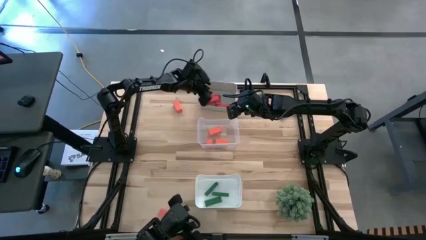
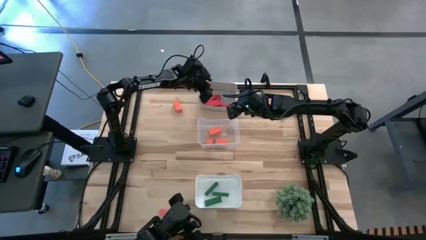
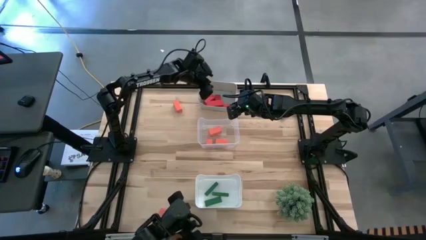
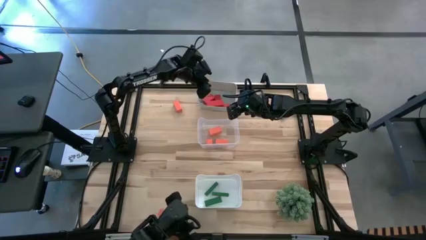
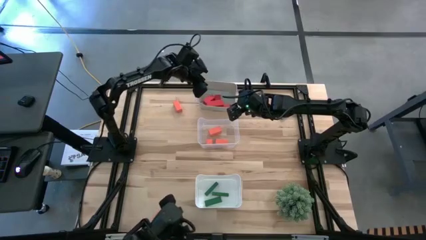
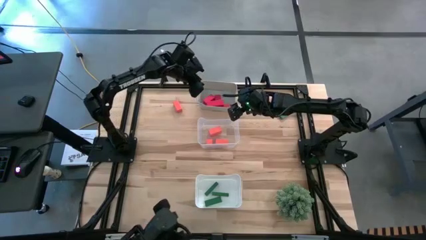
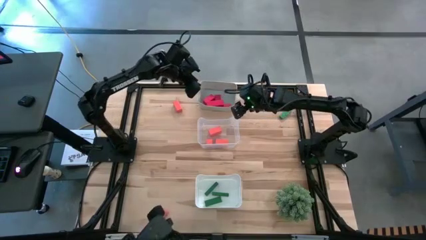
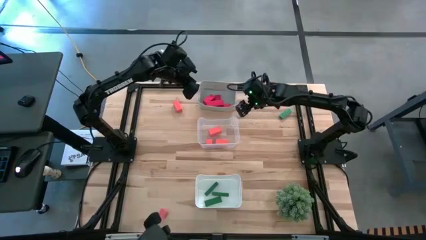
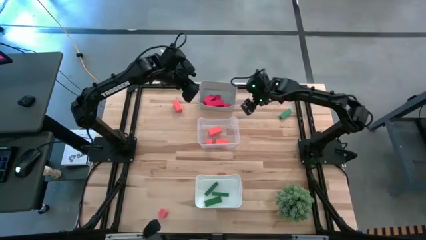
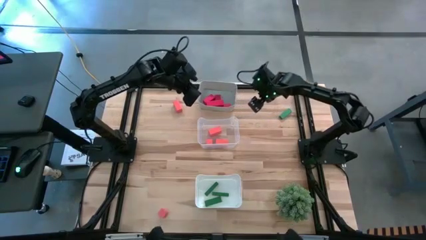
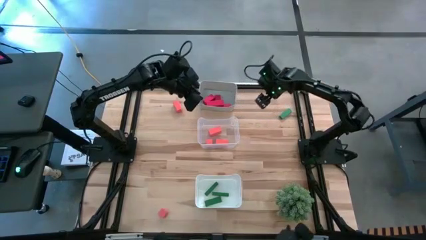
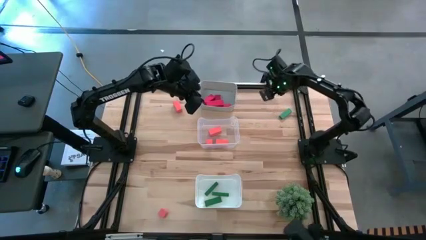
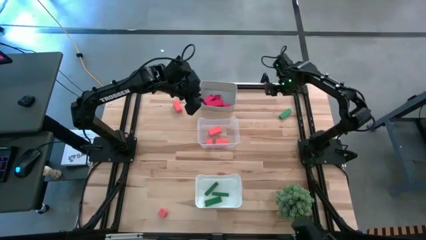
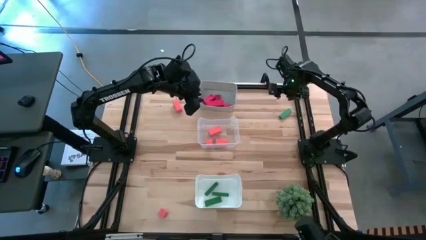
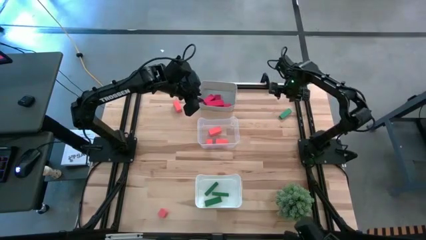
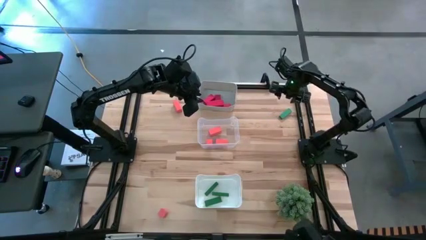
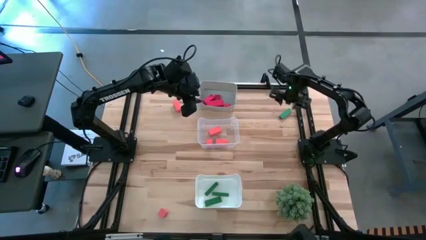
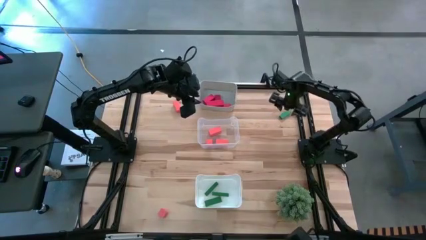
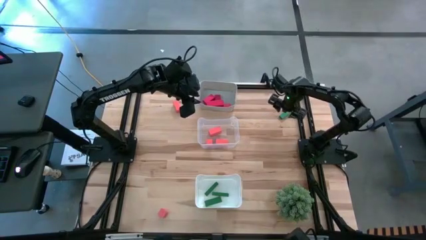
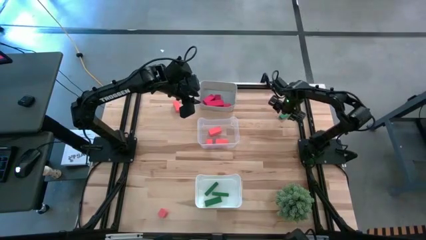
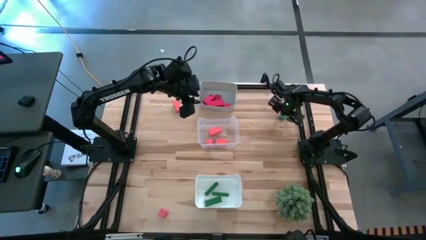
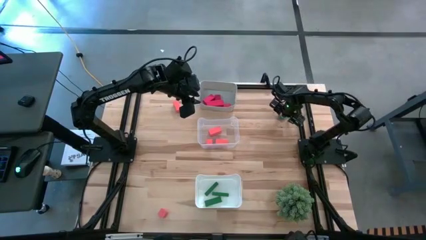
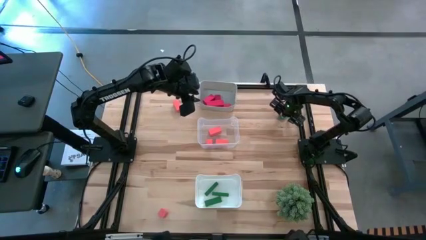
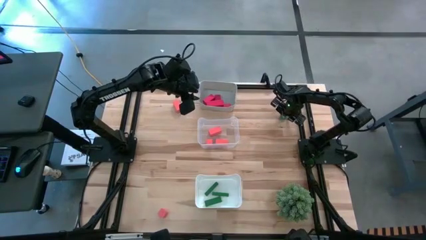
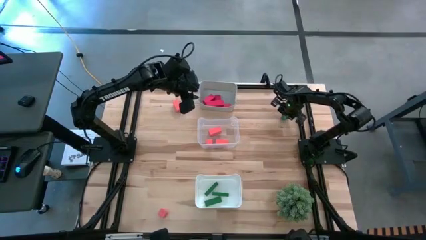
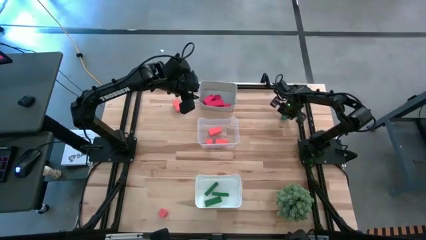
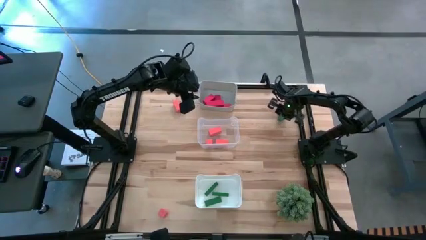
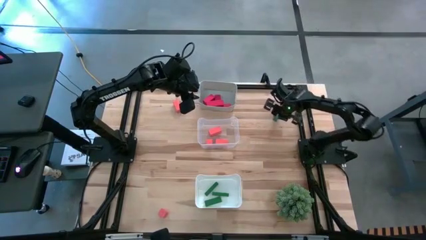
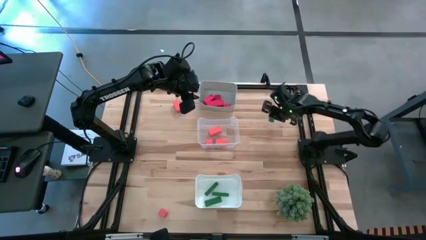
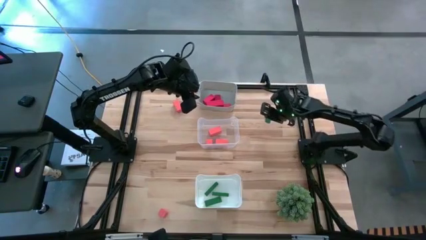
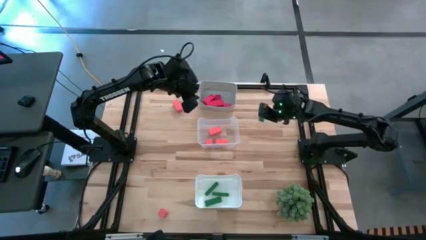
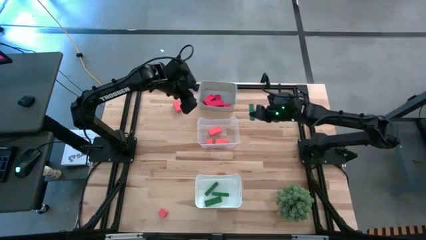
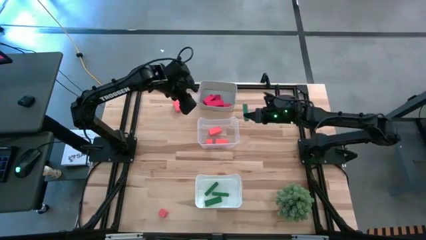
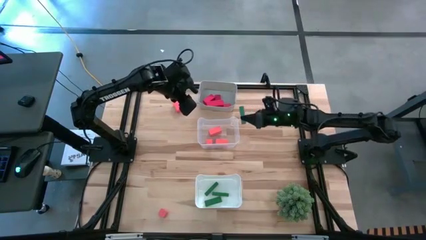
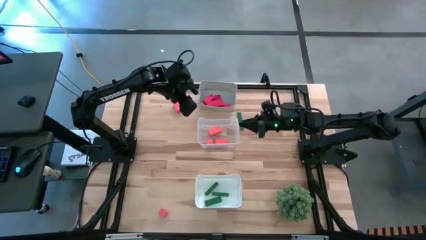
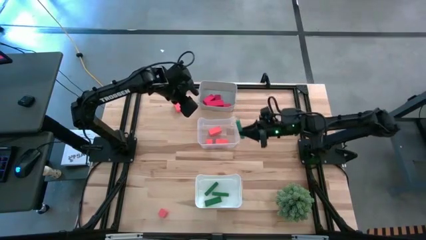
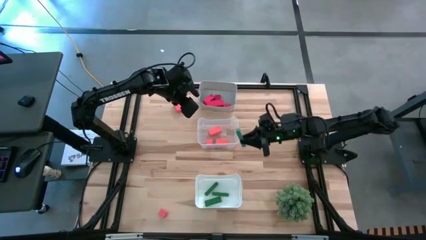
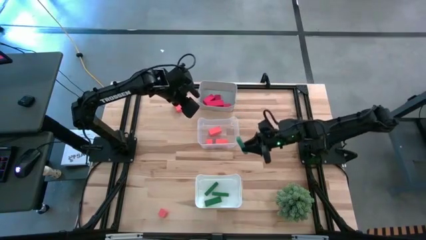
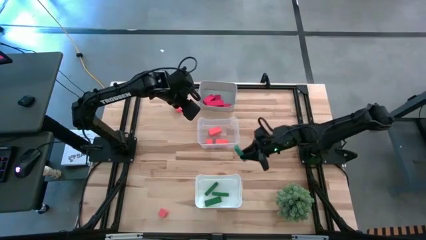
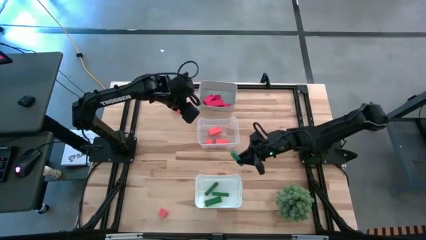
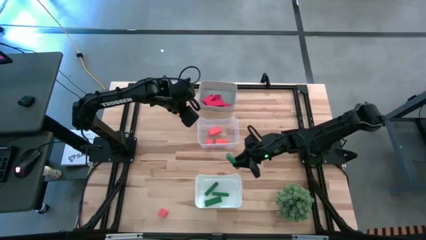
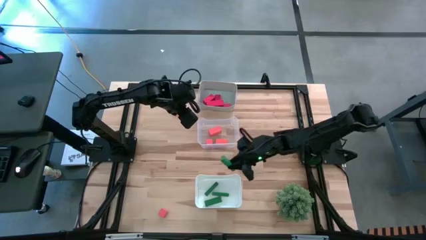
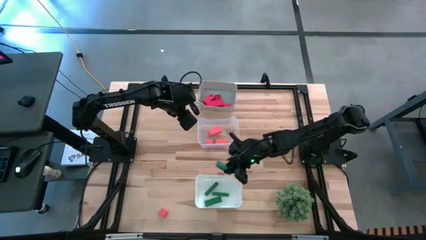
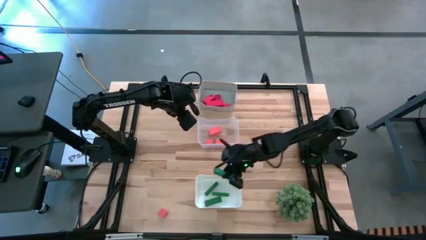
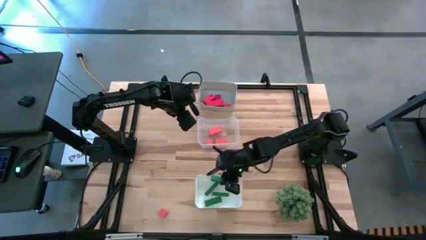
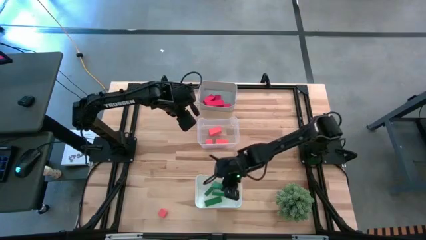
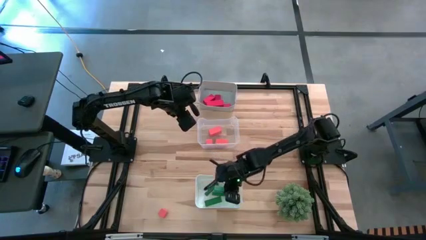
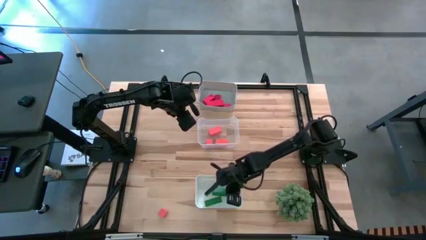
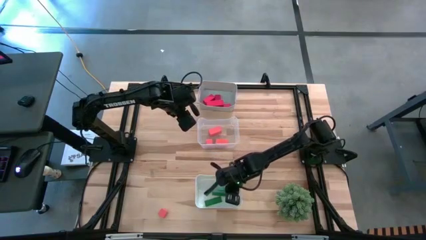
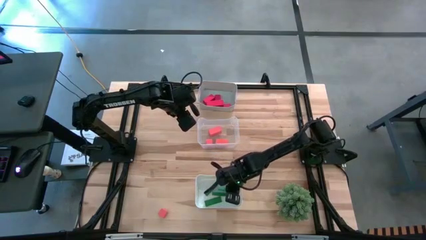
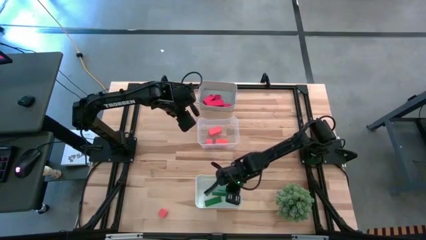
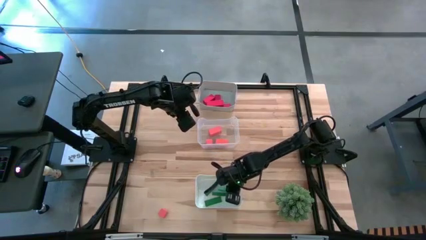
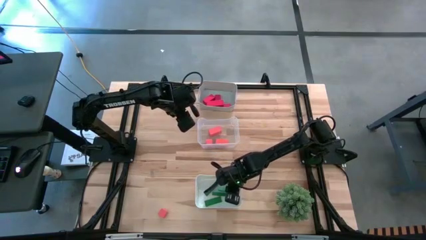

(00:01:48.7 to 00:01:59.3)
Task: Sort & place blocks by color
Put the green block into the white bin
